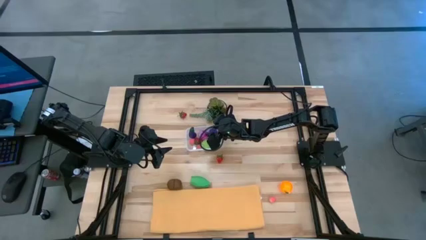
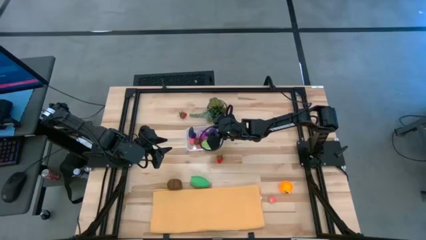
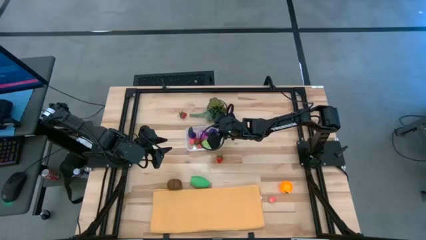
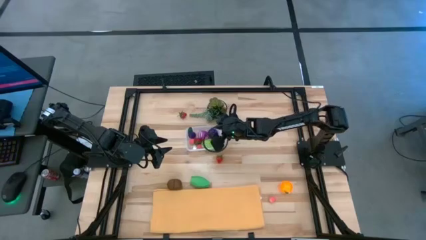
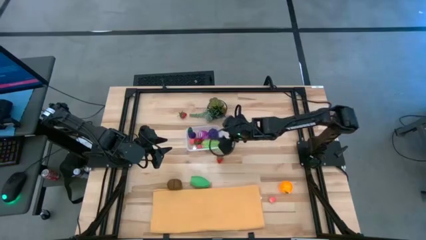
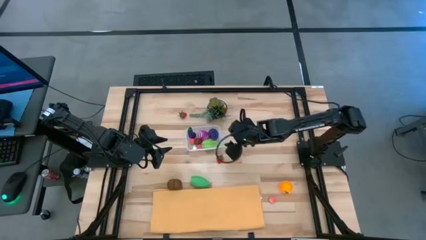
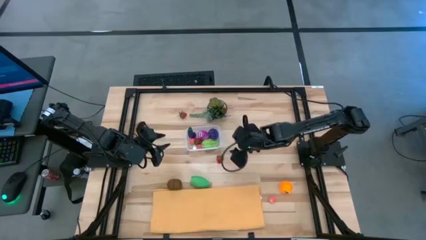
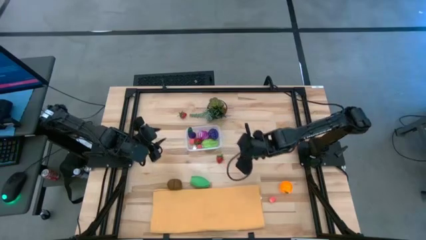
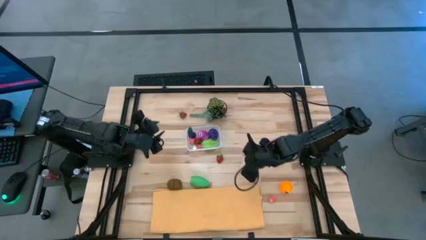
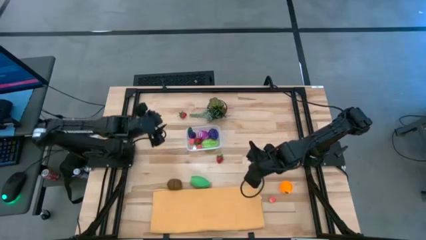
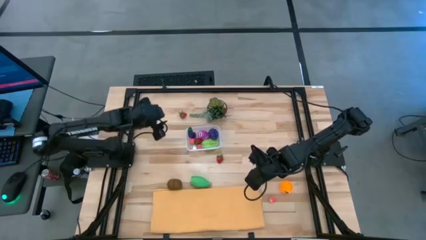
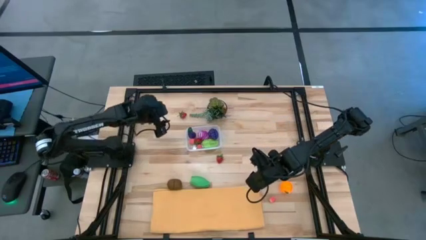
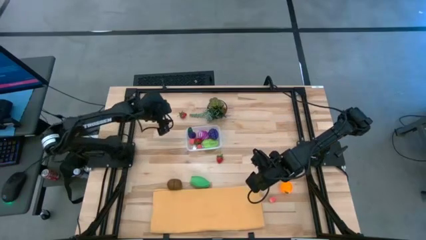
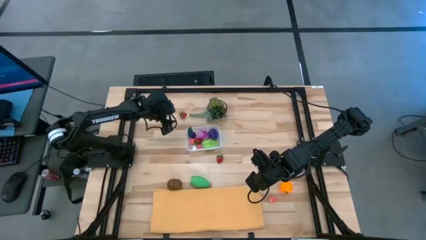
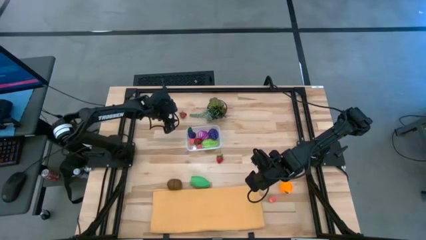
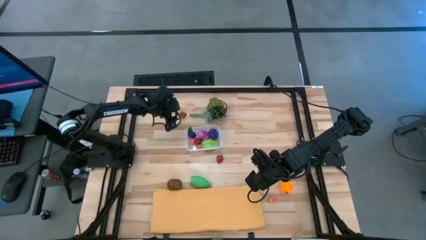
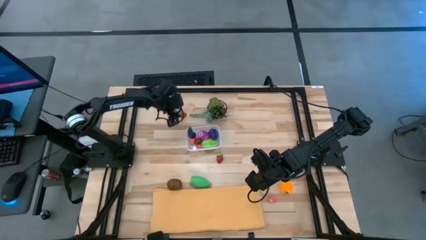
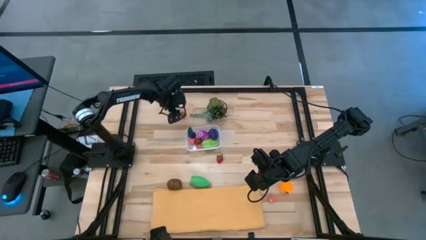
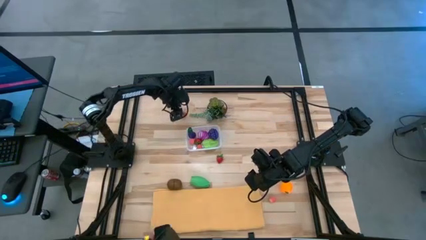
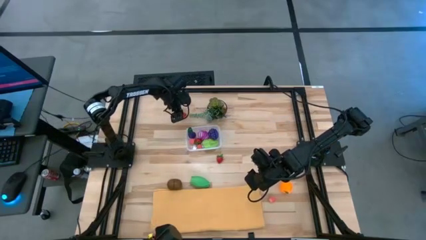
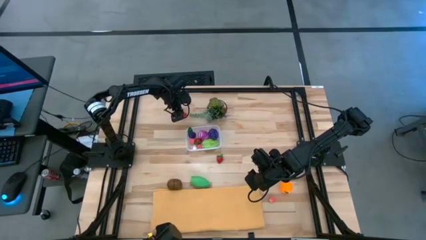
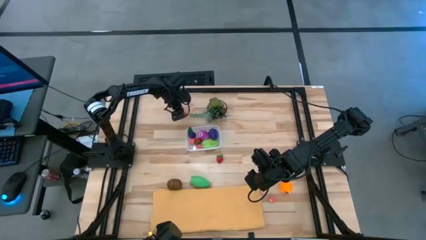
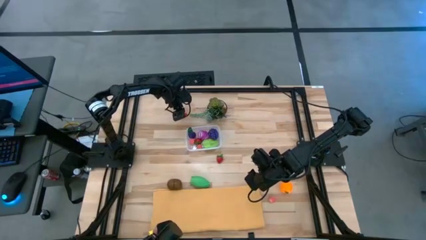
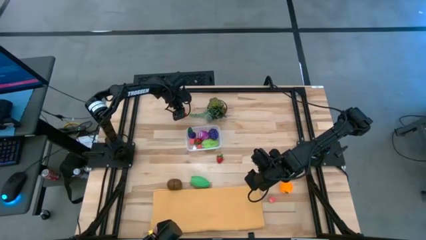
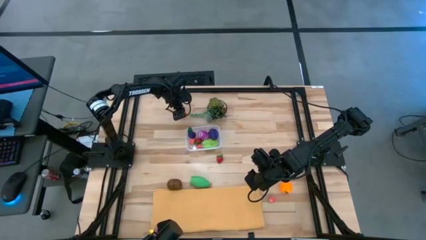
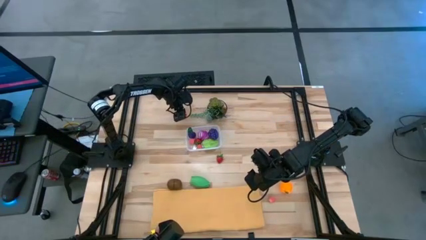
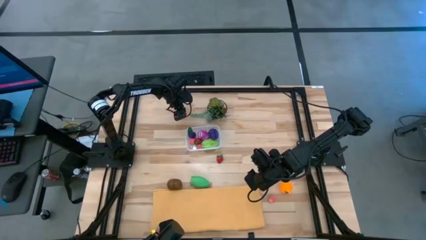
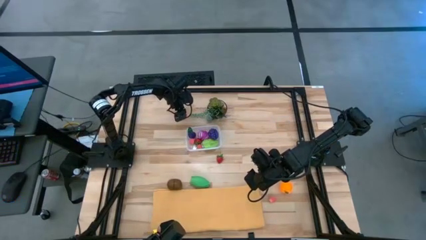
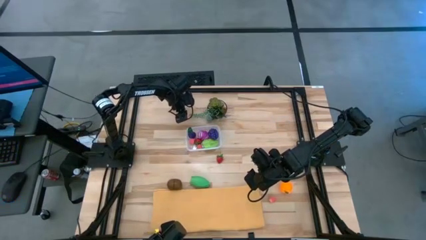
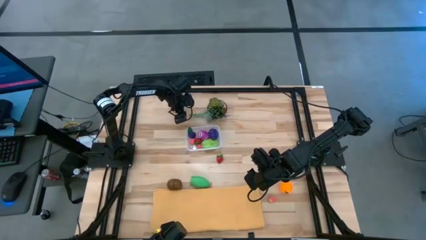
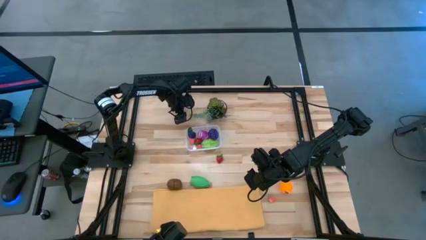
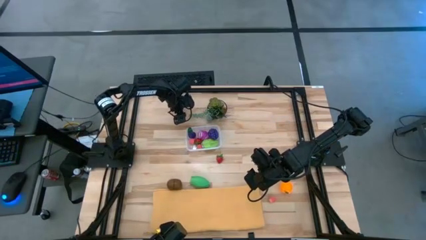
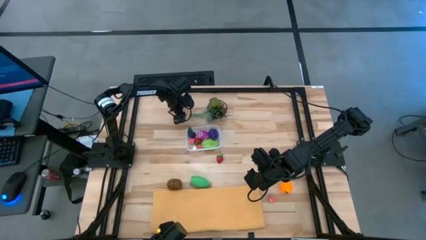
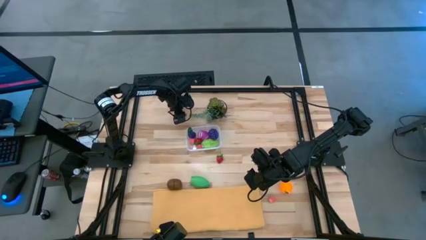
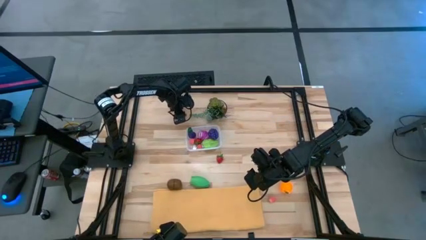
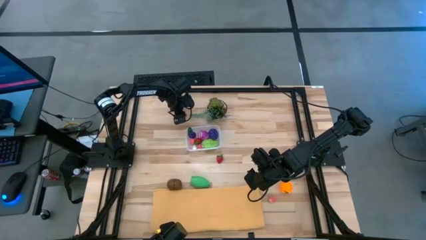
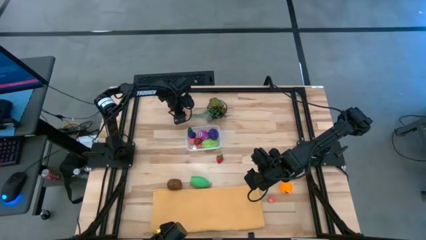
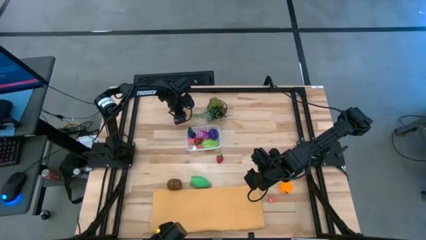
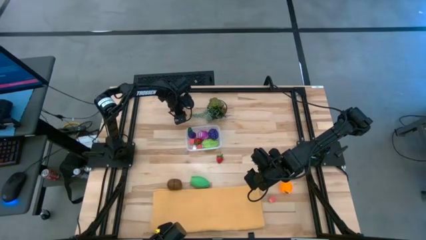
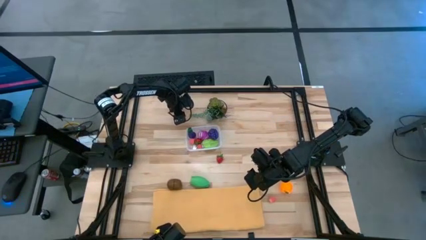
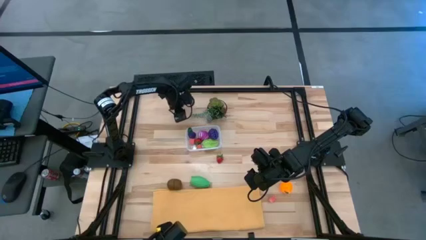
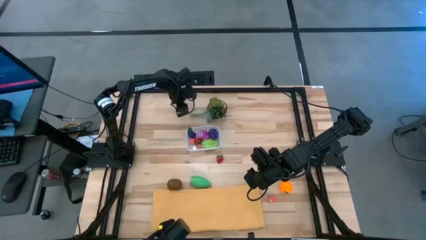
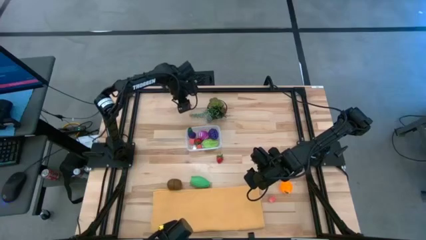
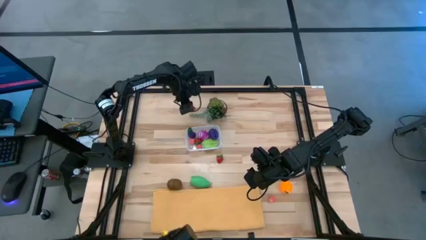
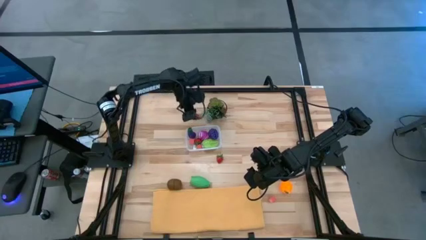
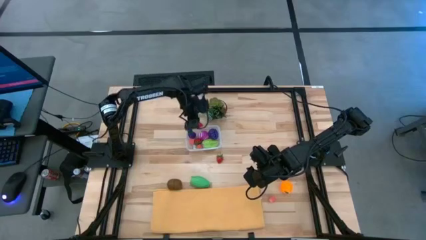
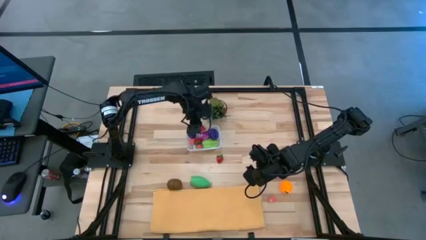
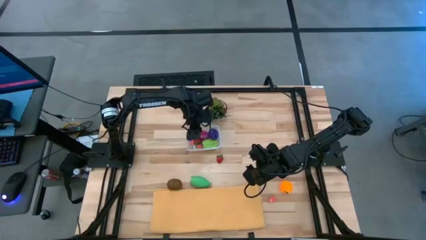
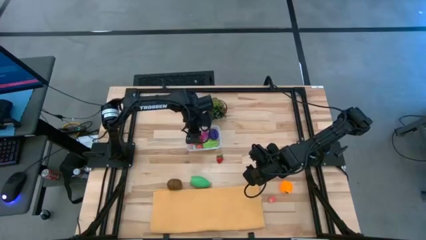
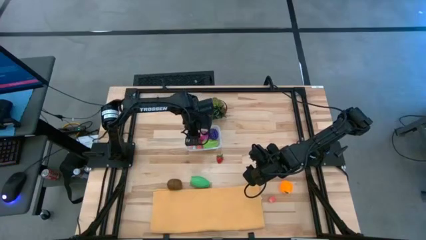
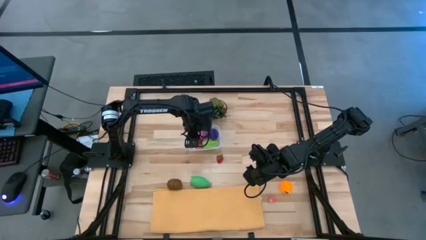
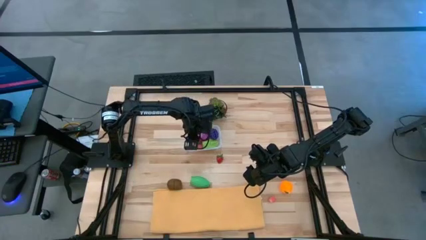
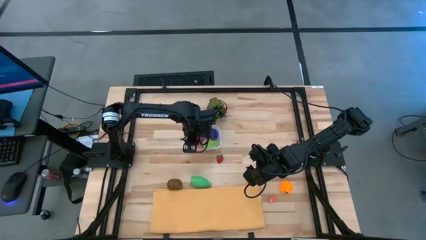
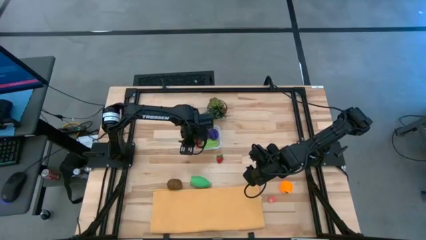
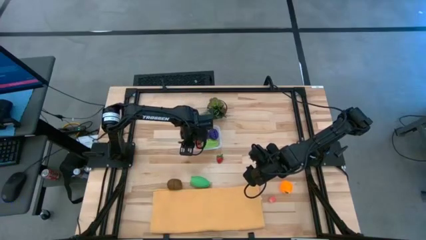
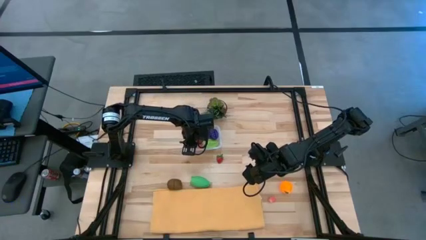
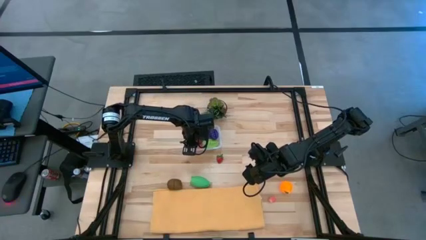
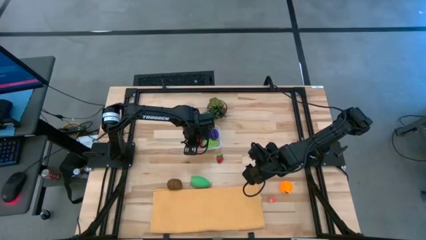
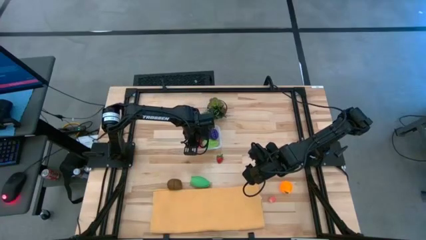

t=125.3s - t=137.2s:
Task: Pick and placing Produce into tupperware
Put the top red strawberry into the transparent bin

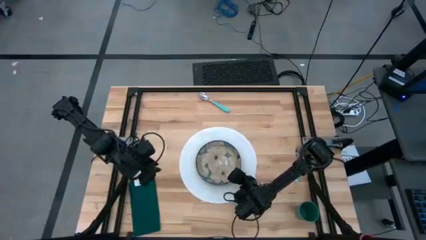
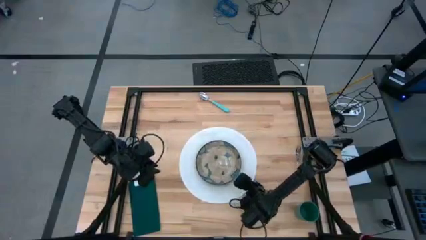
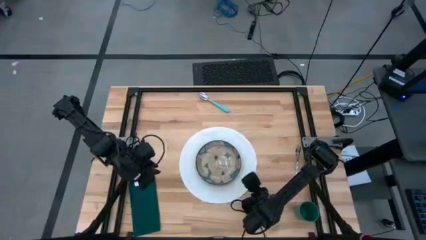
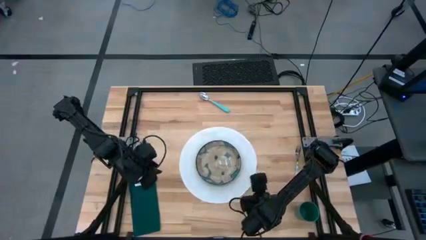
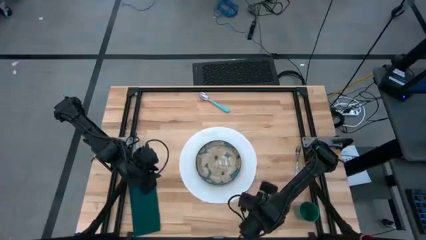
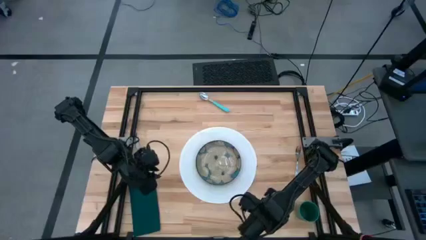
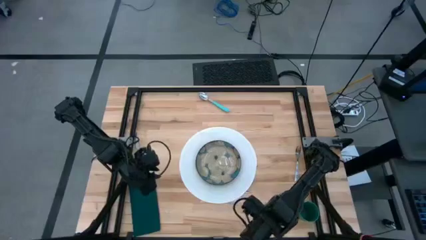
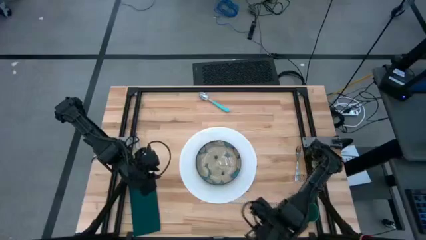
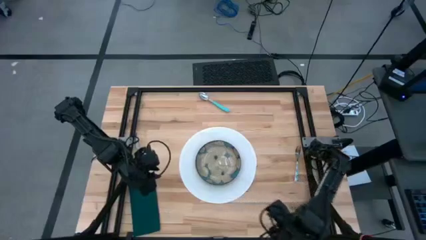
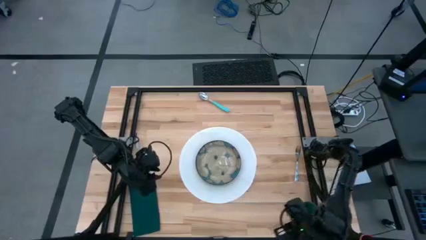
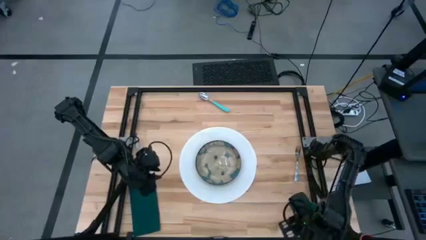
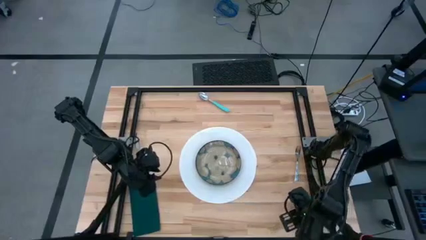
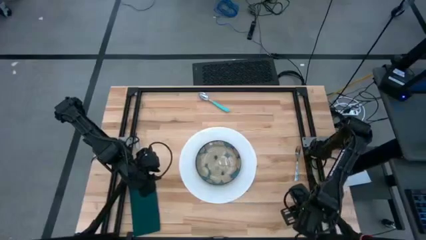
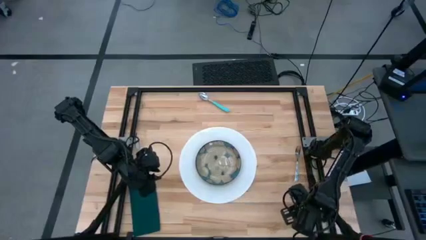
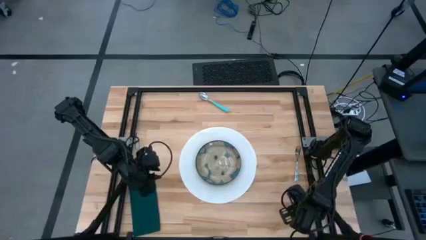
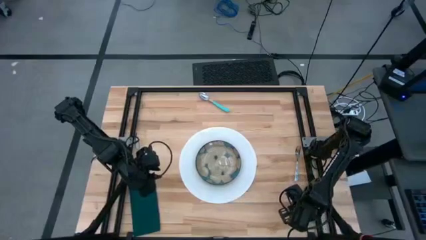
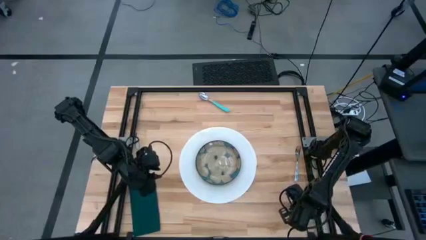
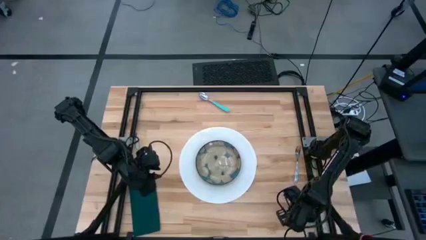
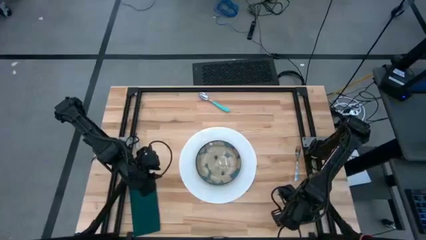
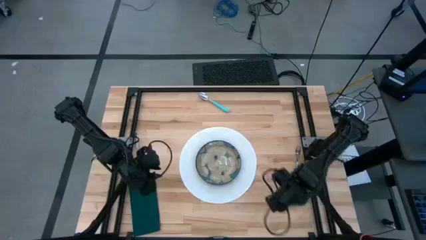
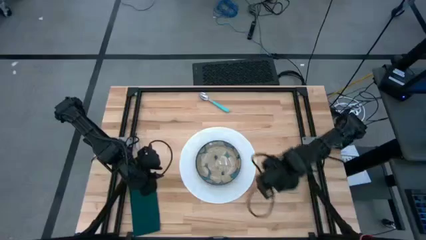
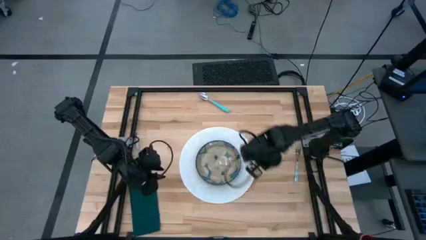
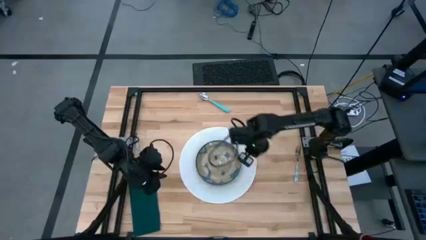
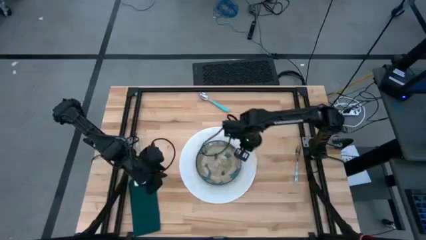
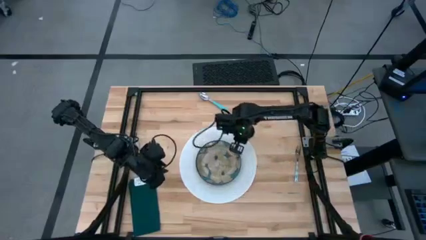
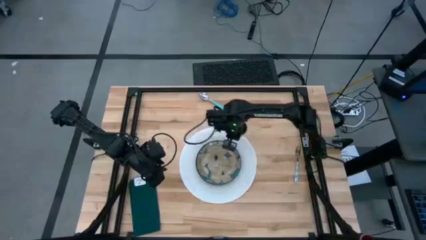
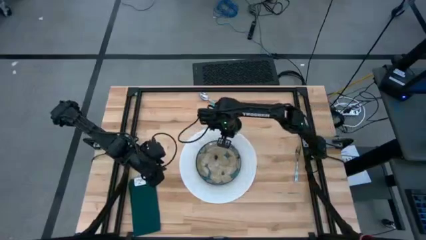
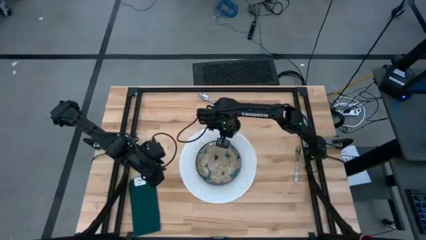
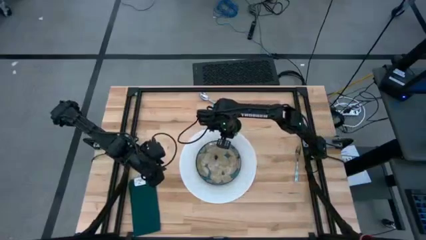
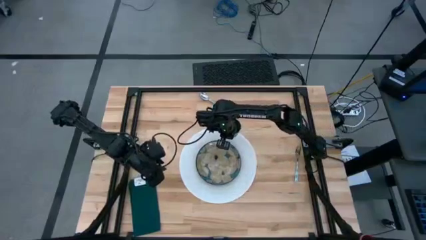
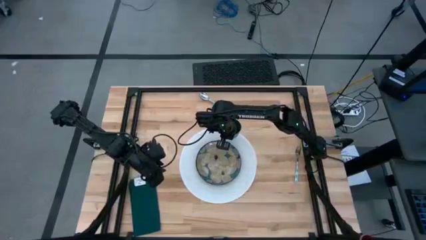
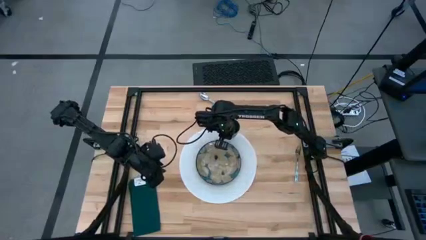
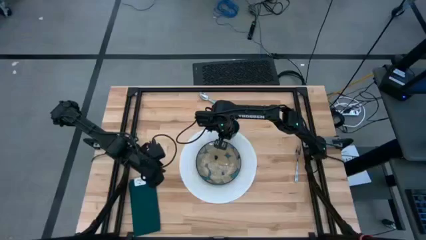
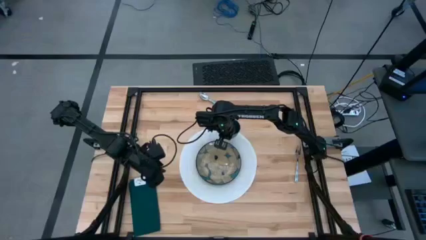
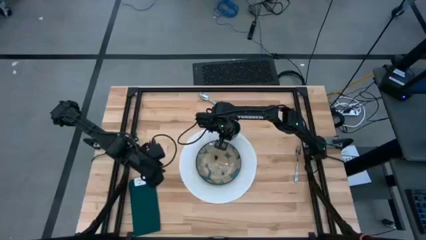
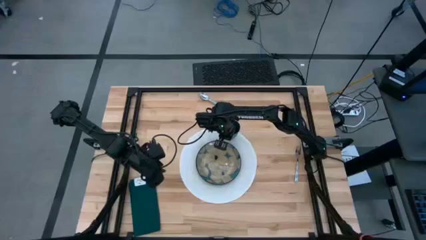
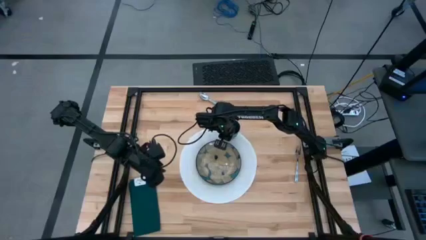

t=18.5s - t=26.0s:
Task: Set table place
Put the dark green cup on the top right of the white table mat
